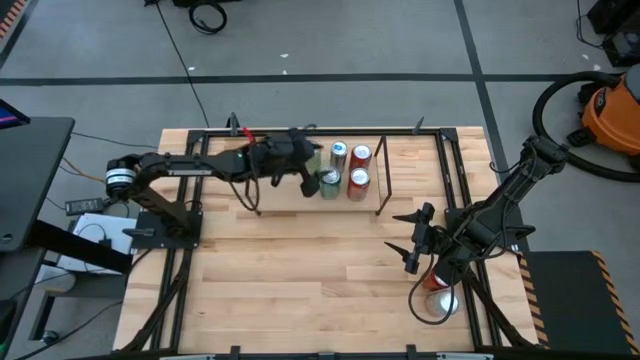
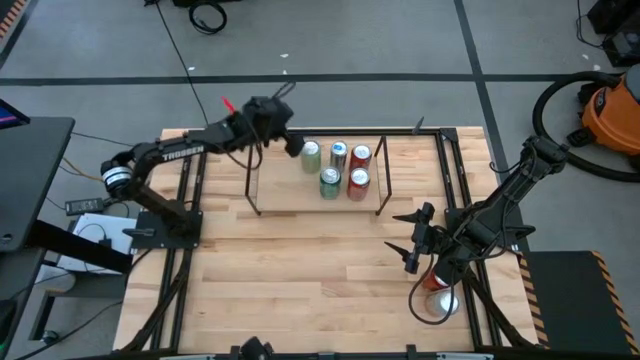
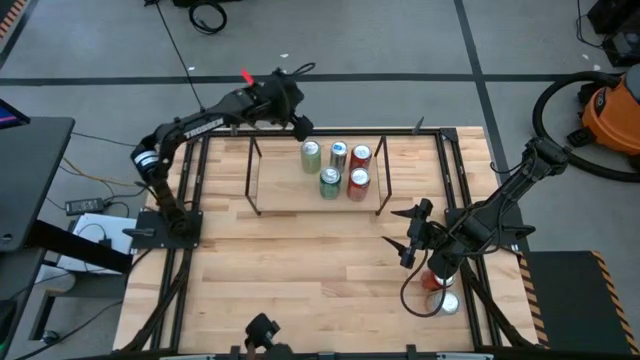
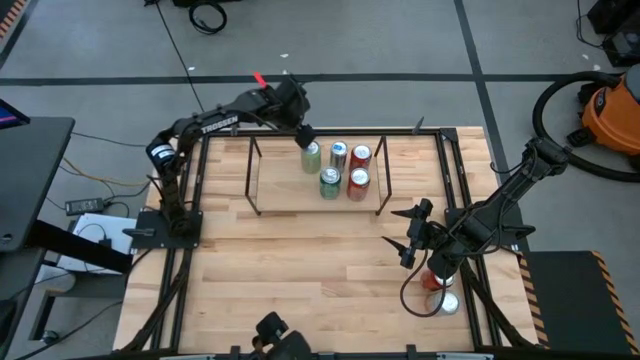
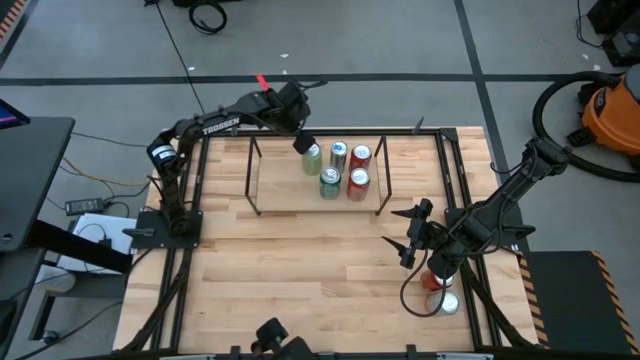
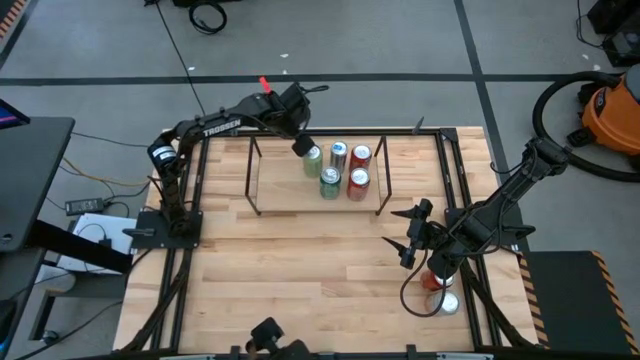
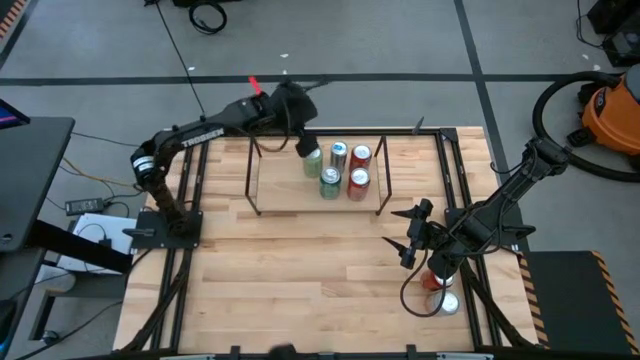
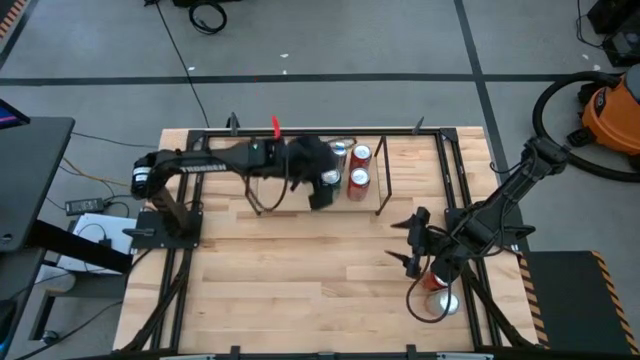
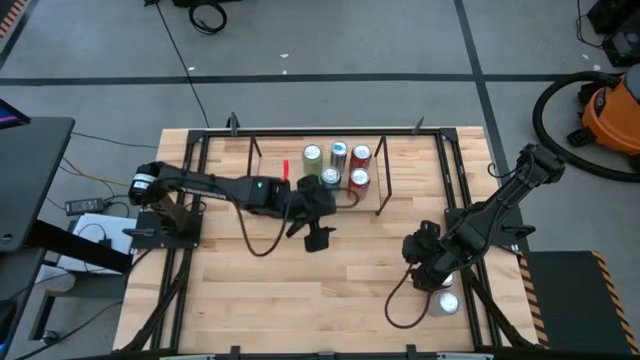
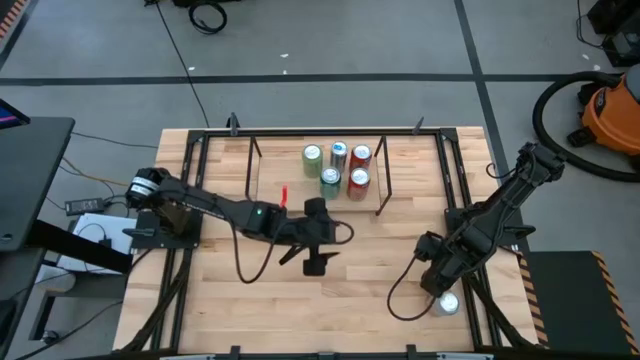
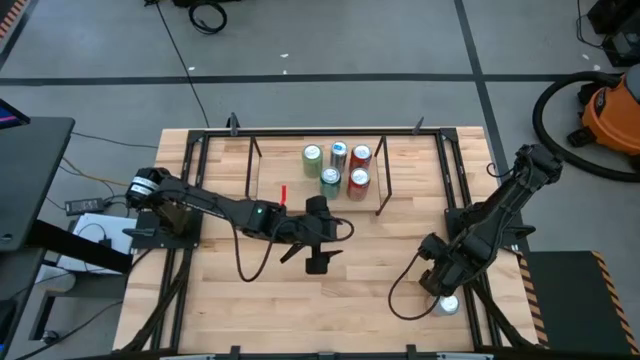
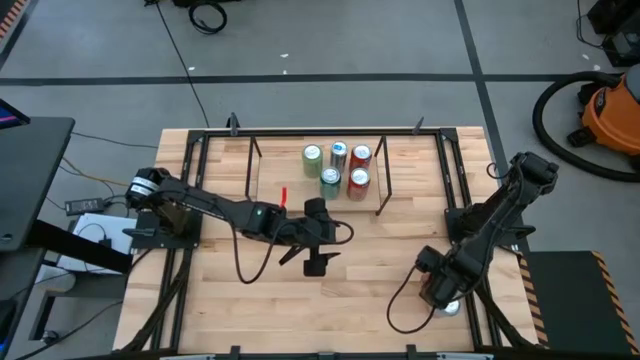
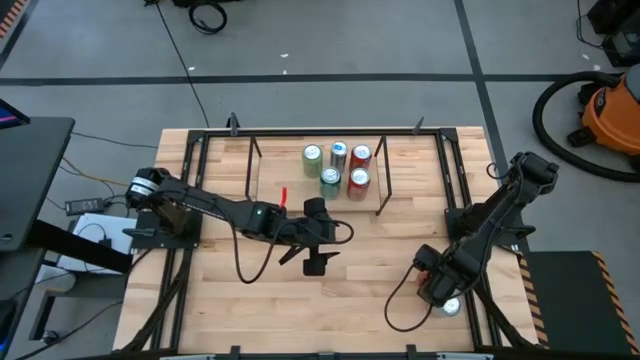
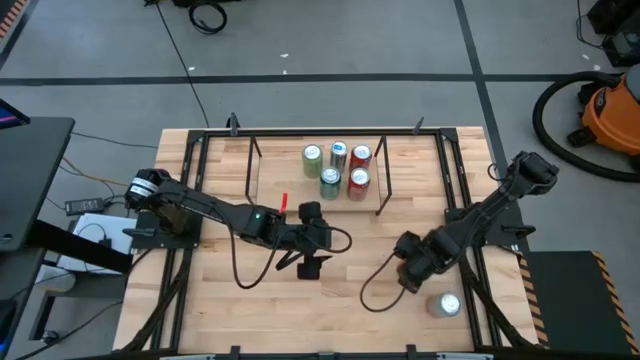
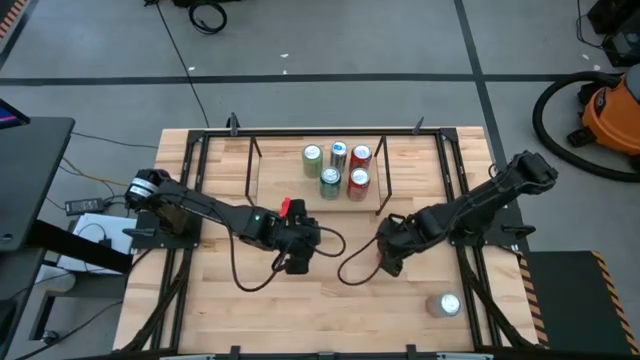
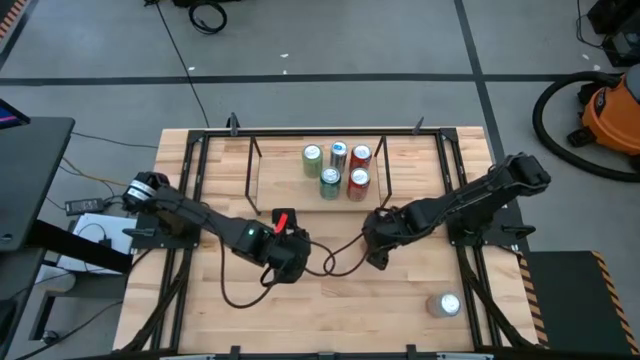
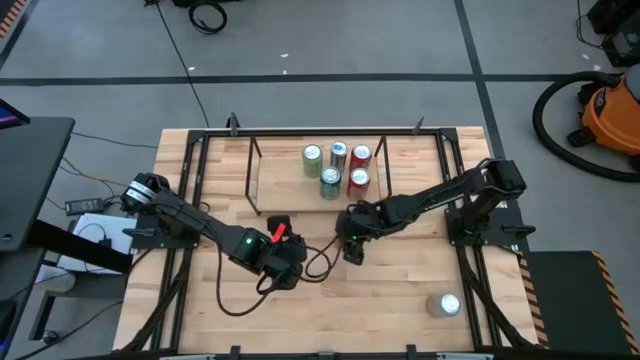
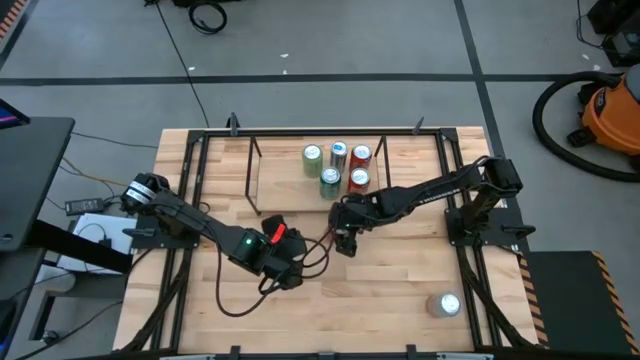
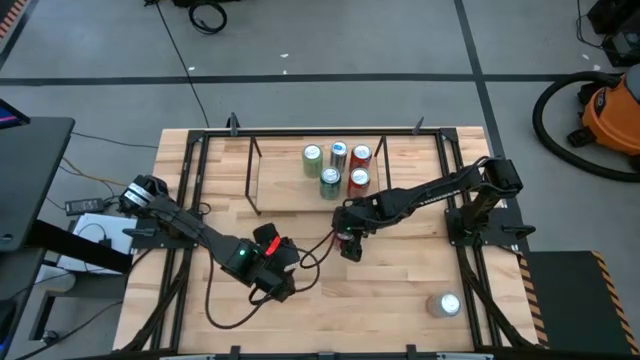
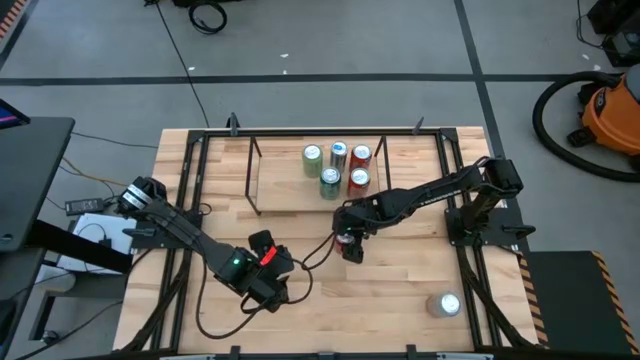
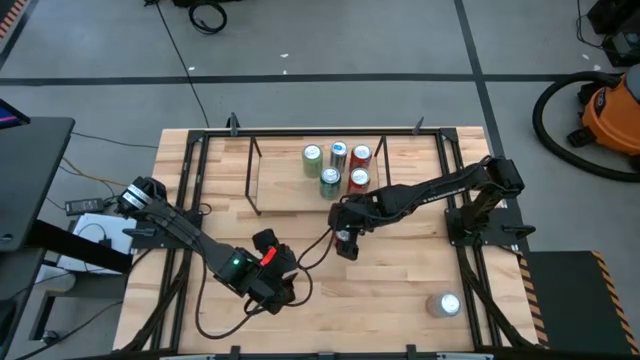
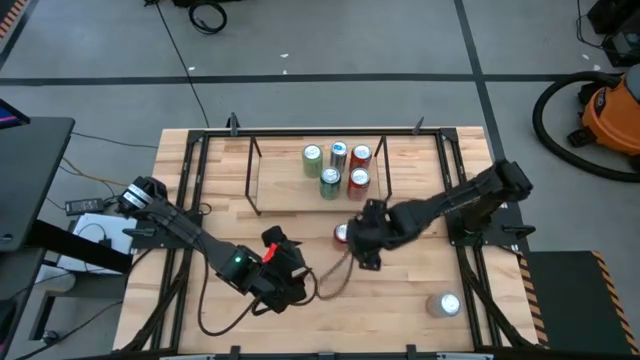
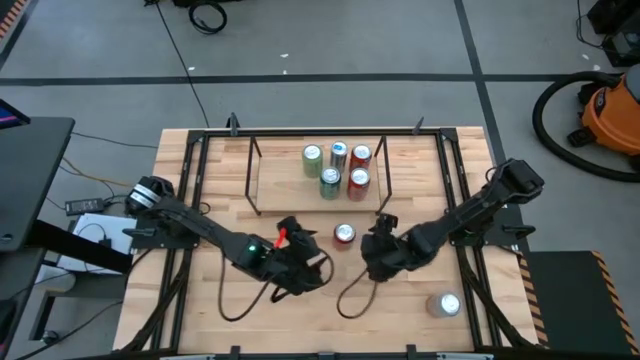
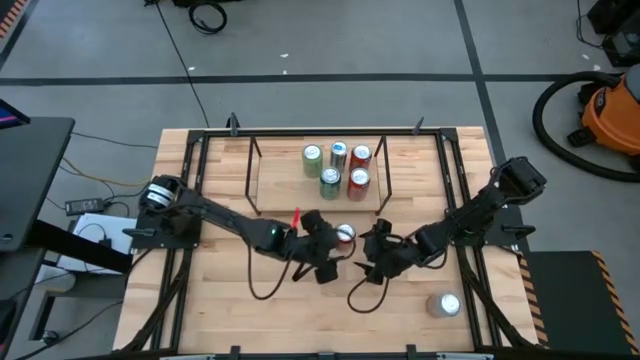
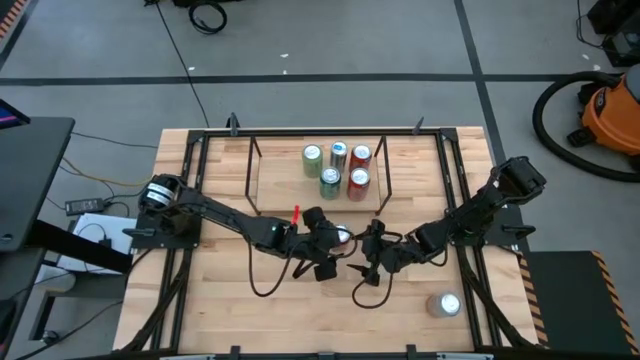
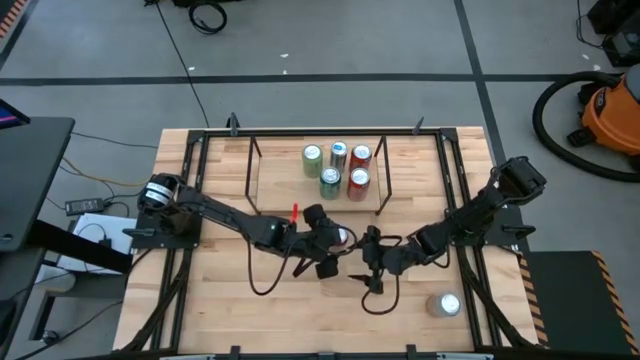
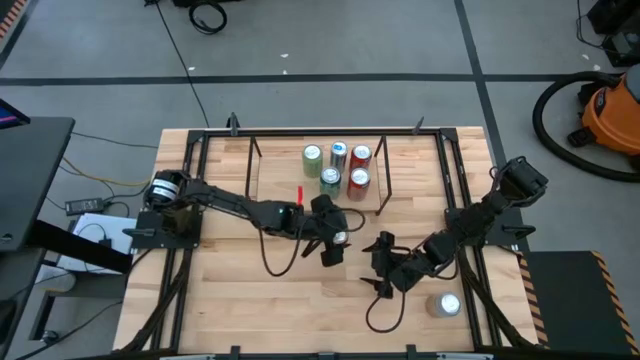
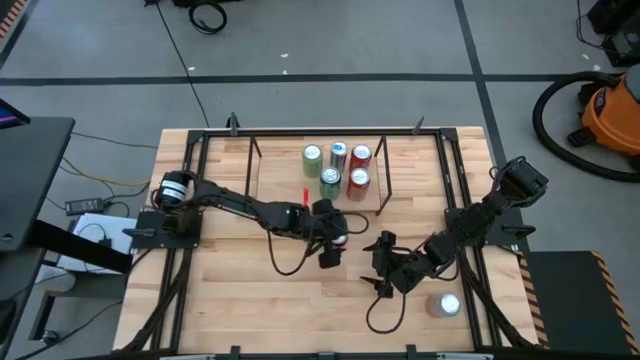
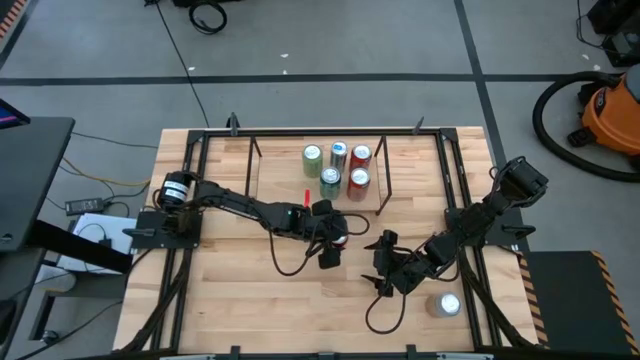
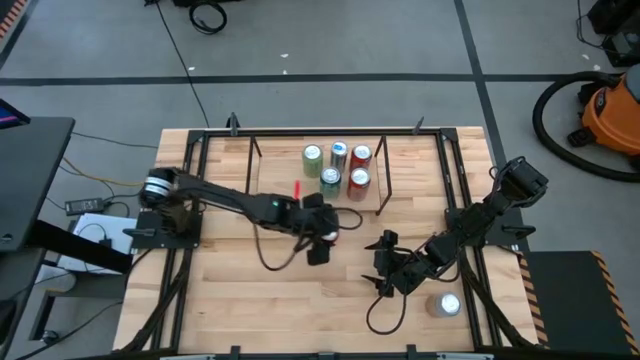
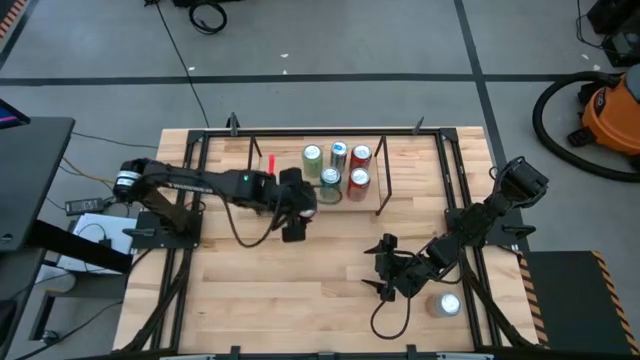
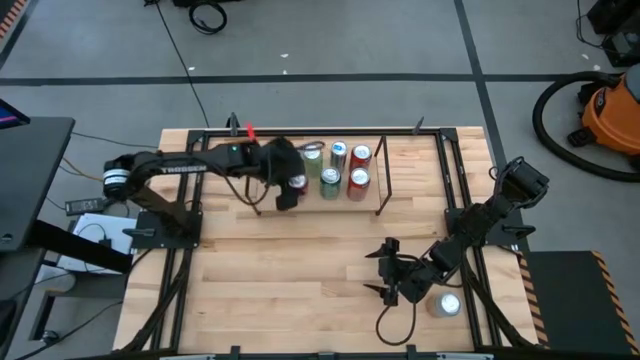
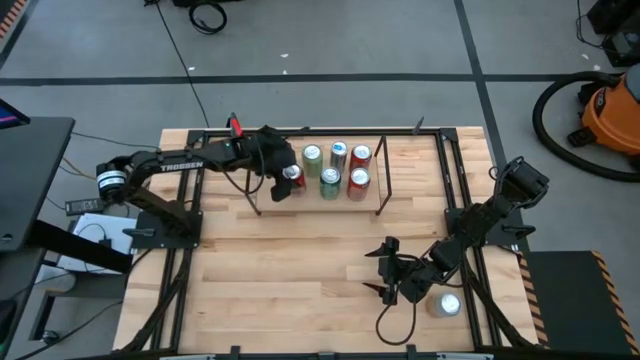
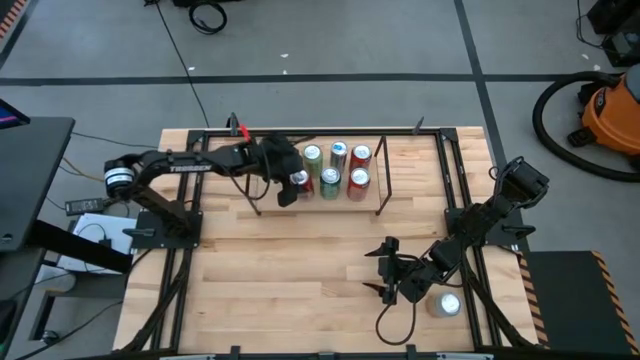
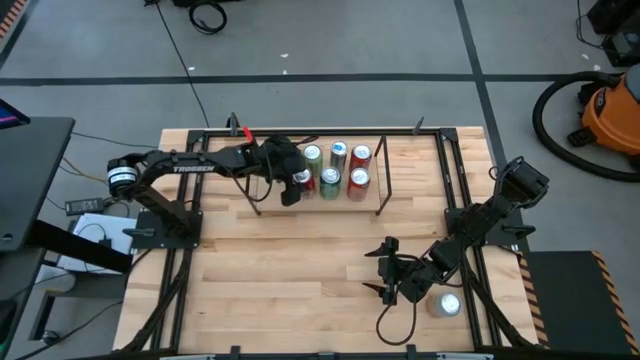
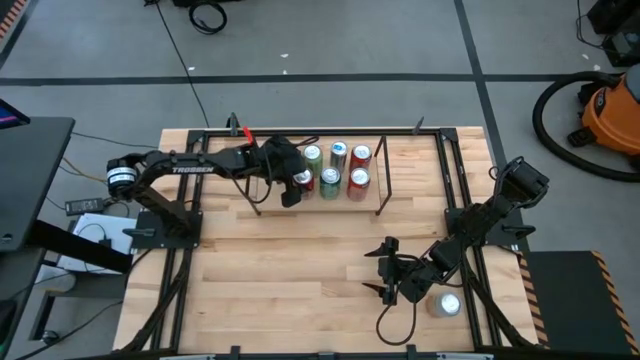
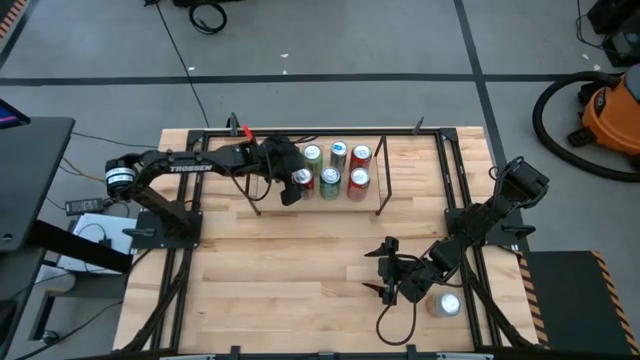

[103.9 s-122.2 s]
Task: Place canned beverage on shelf
Put the red-black soda can on the shelf
